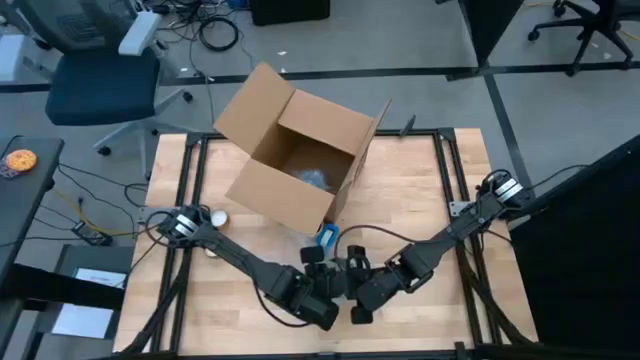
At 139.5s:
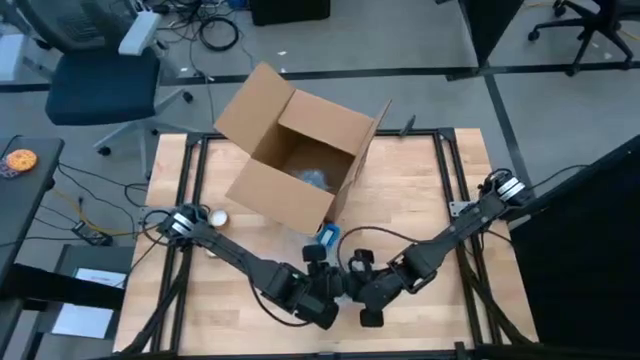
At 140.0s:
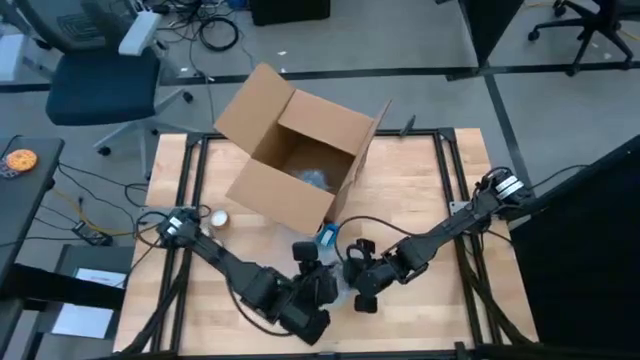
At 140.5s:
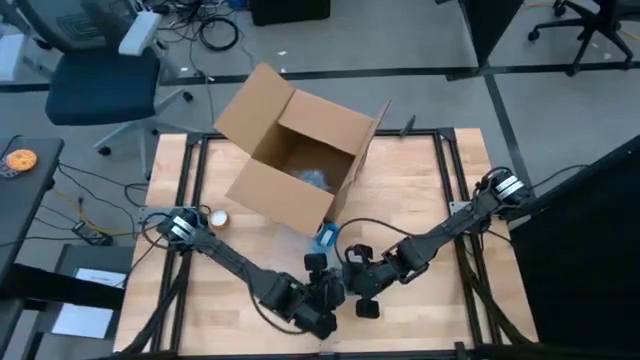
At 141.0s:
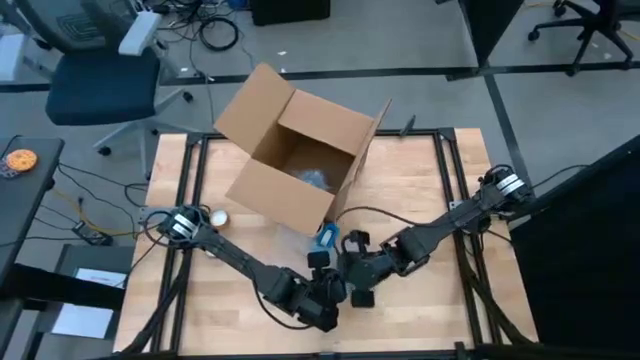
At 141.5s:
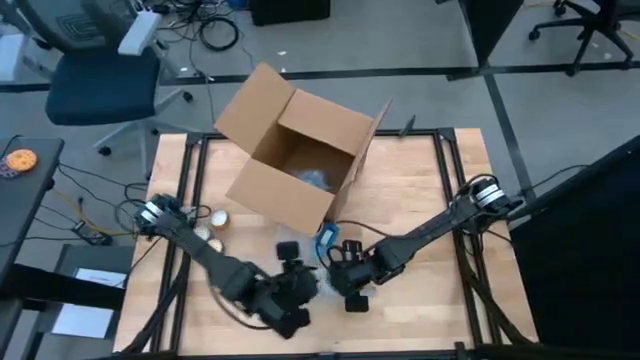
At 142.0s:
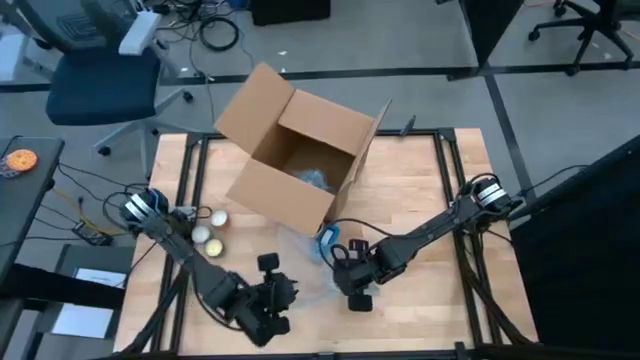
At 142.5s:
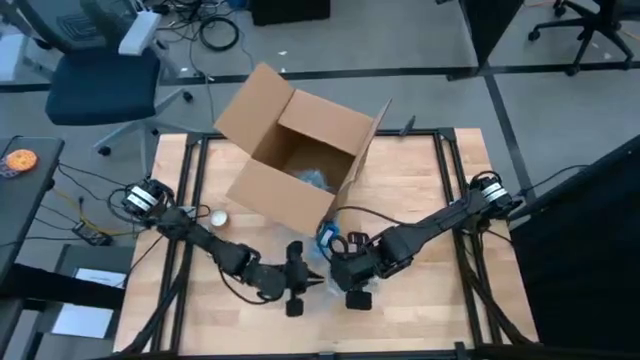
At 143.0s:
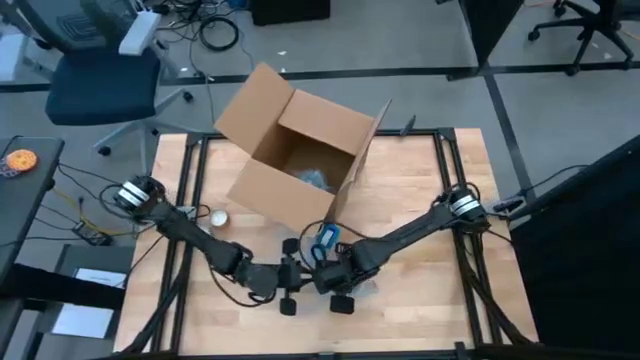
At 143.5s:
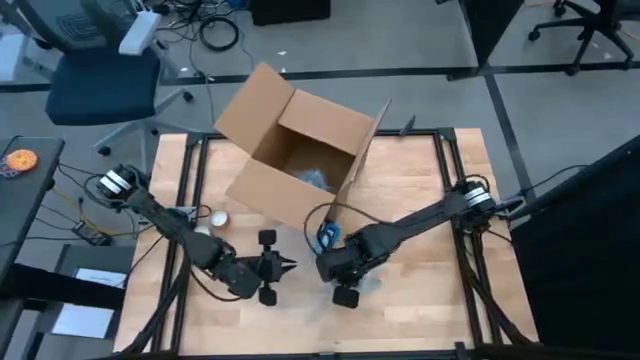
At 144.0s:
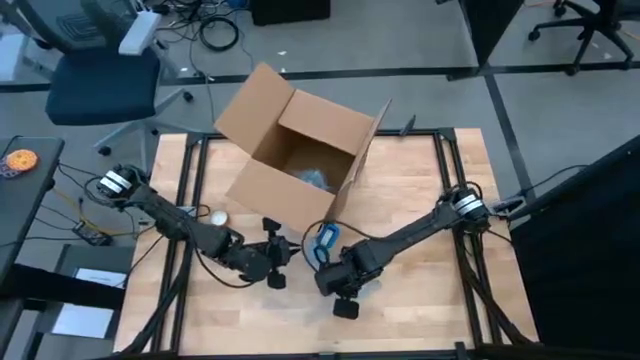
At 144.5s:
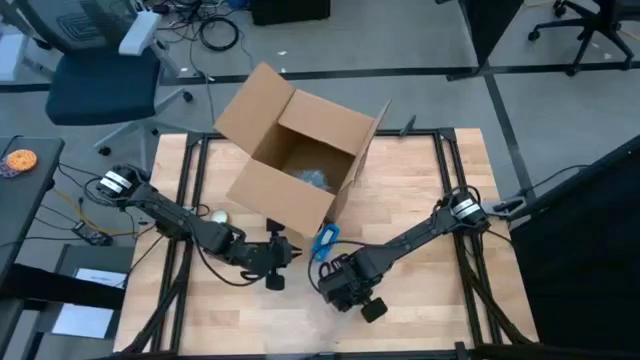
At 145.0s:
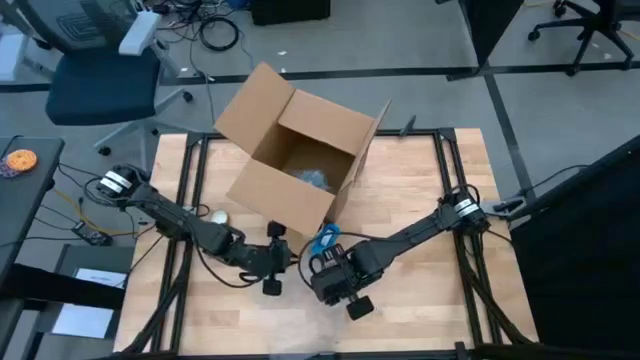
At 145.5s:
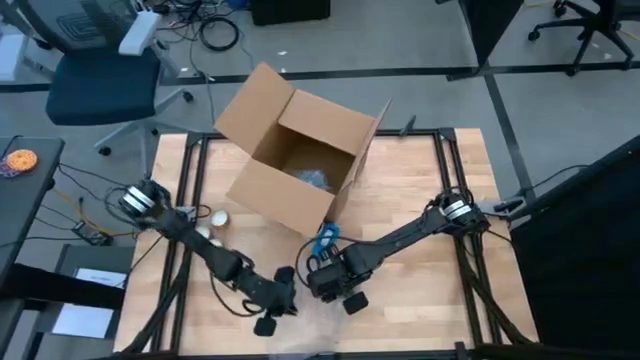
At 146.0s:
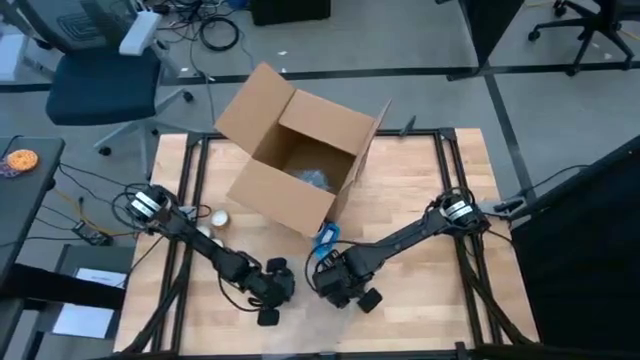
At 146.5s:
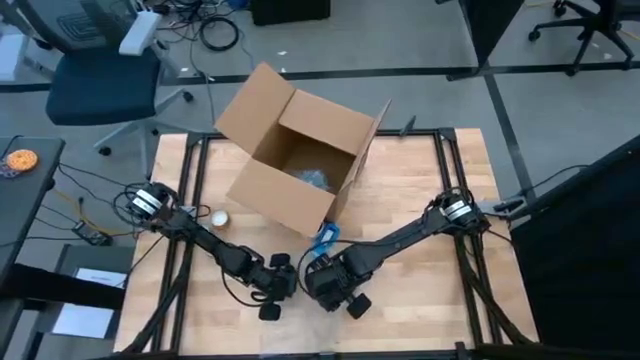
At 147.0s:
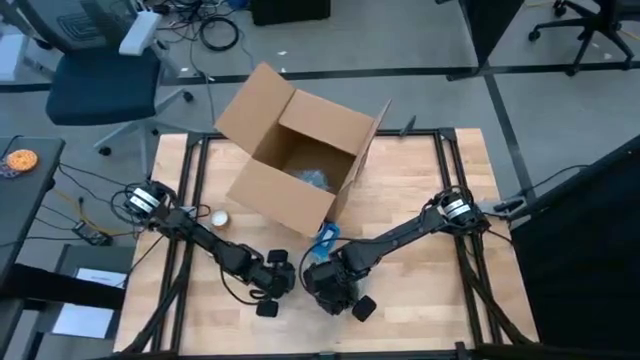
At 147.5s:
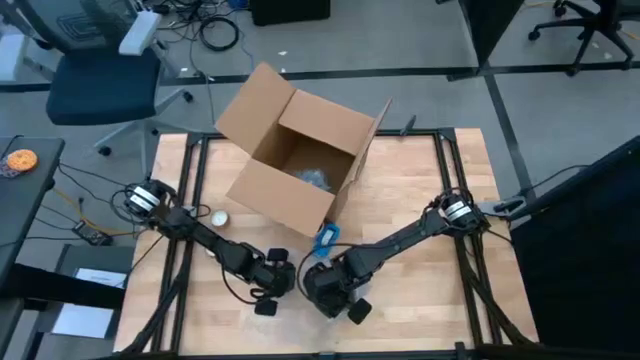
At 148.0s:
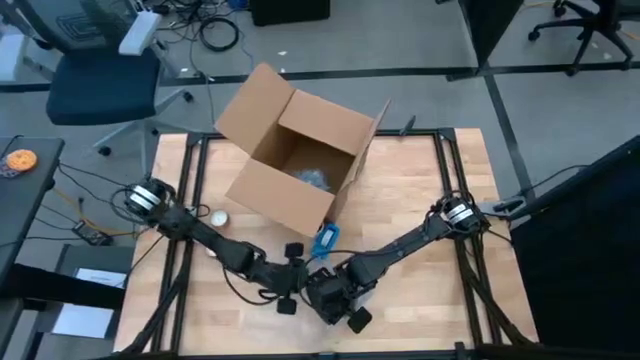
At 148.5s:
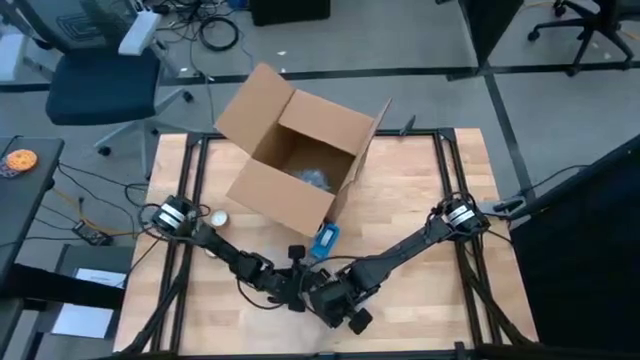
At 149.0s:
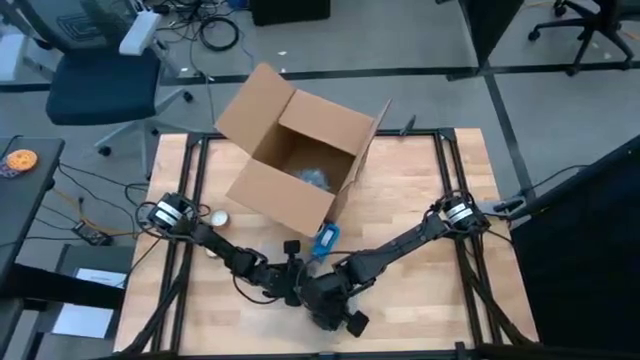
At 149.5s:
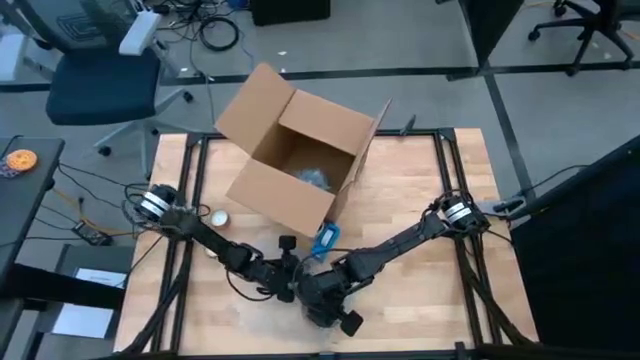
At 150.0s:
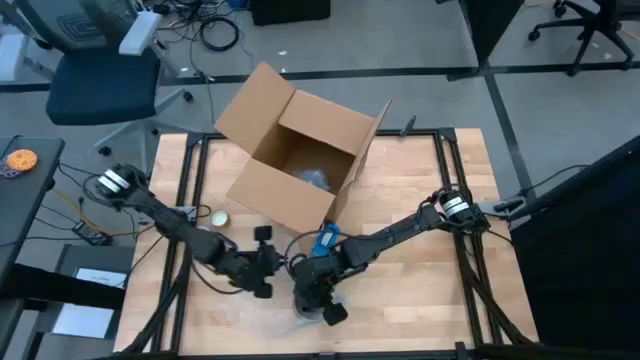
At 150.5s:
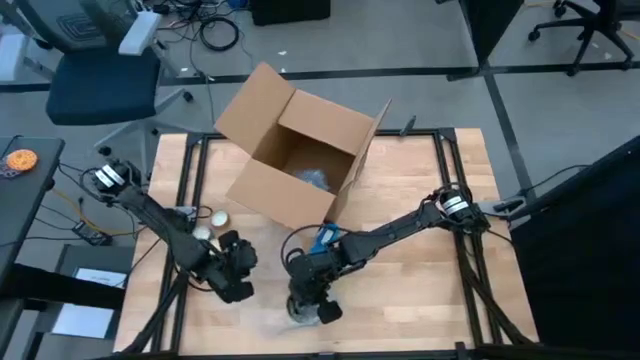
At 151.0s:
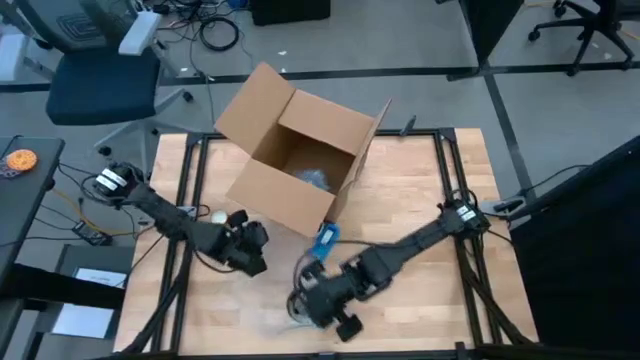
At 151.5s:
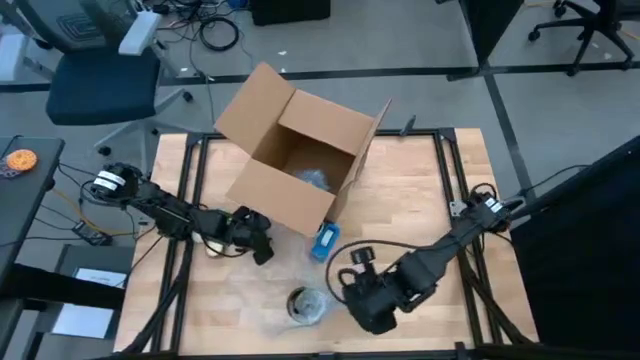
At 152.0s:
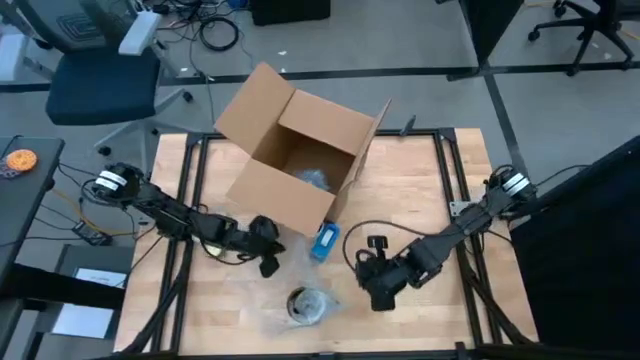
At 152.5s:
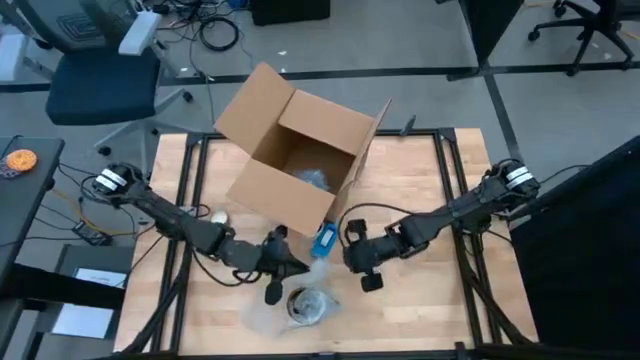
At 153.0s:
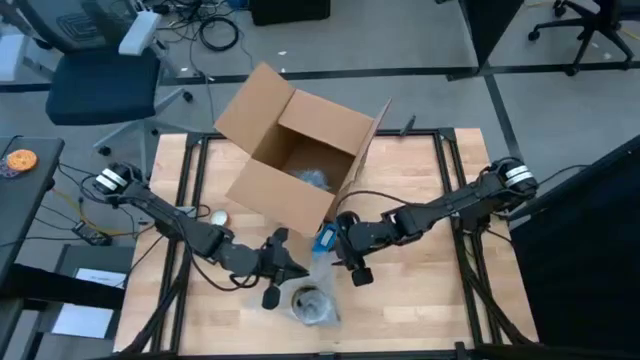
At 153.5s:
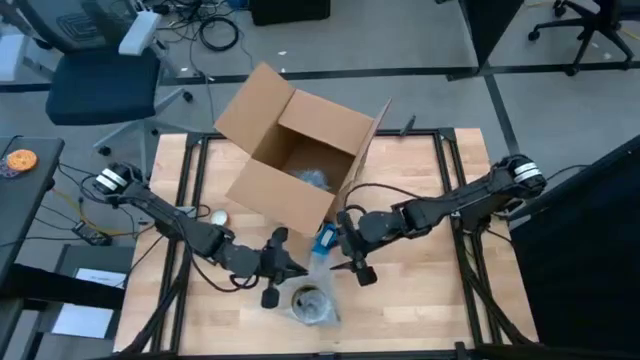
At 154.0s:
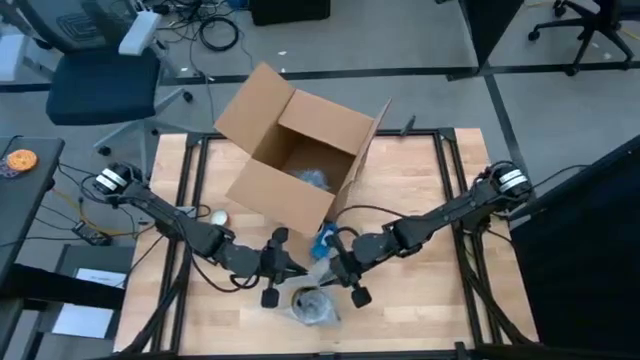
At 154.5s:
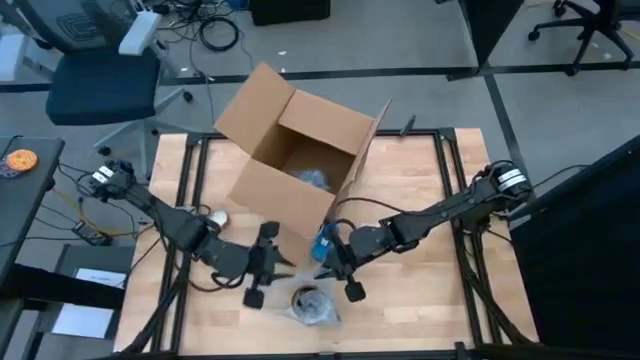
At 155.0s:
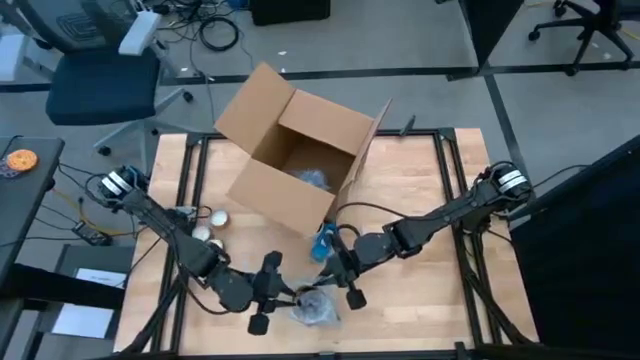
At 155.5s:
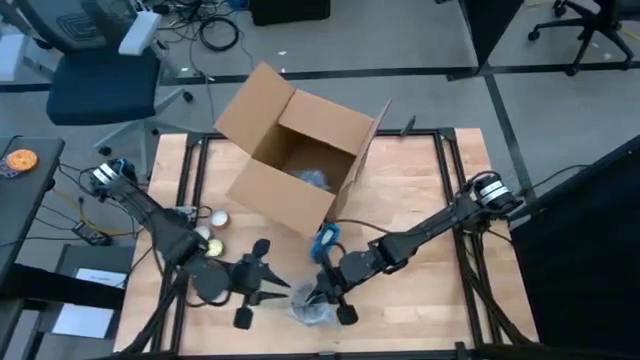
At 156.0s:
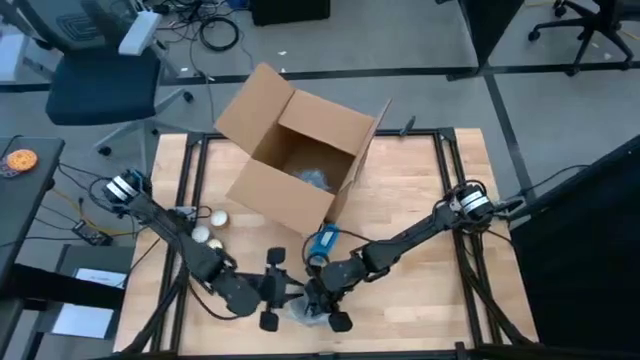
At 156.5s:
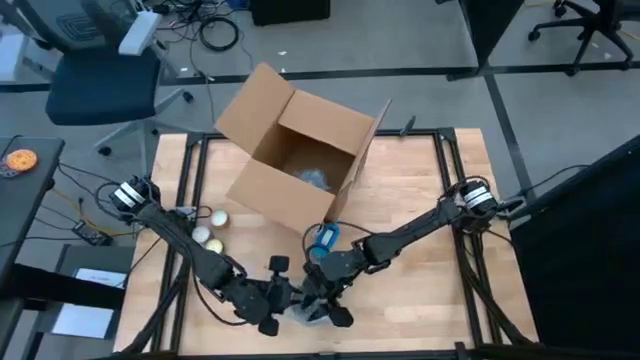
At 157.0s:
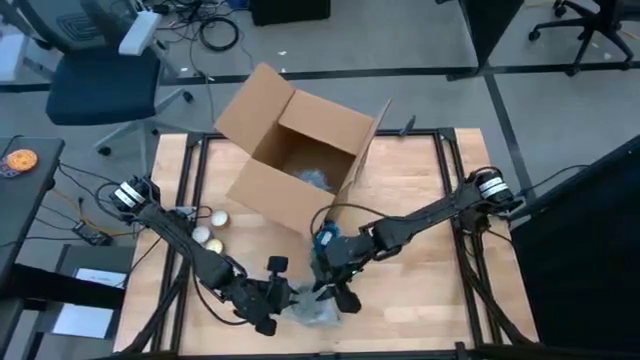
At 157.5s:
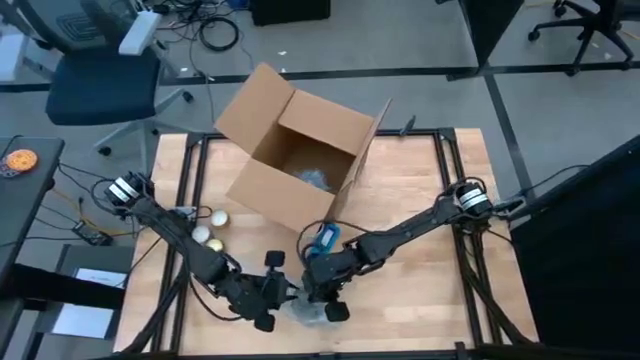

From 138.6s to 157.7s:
Task: wrap mug
Wrap the brown mug with the bubble wrap on the table
